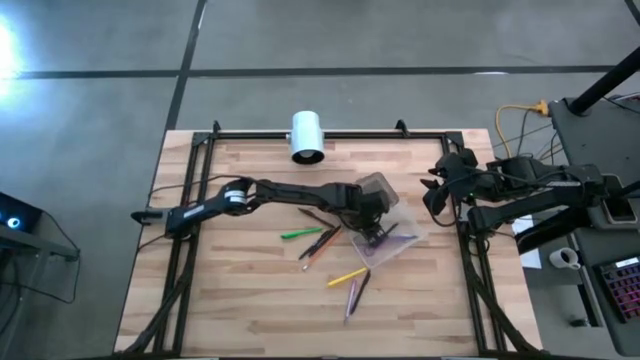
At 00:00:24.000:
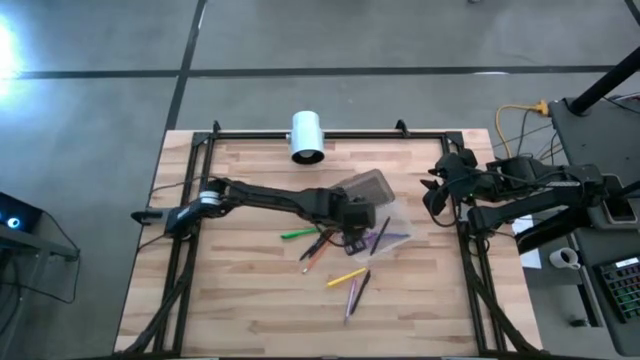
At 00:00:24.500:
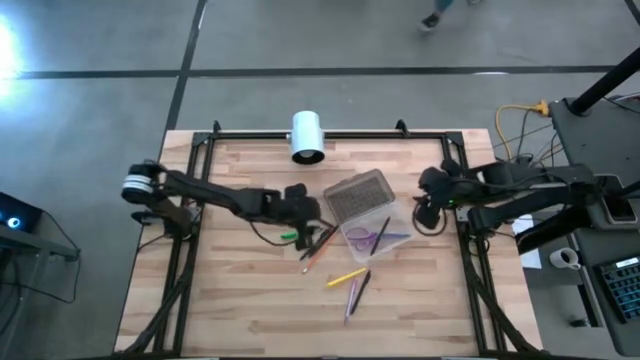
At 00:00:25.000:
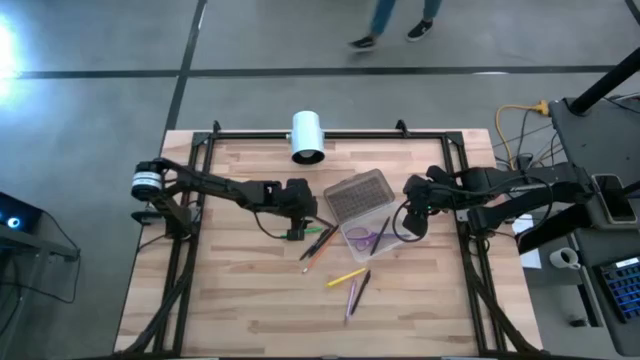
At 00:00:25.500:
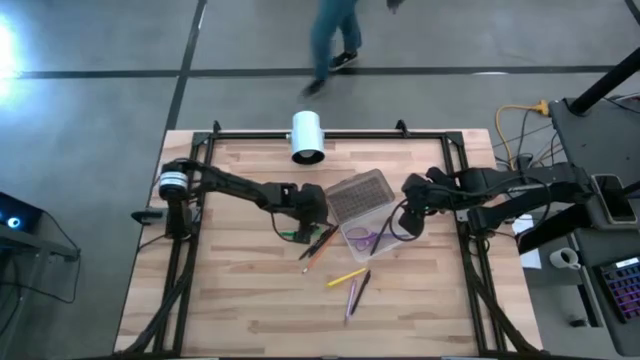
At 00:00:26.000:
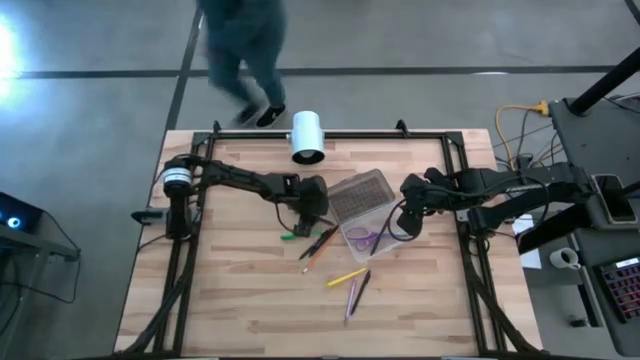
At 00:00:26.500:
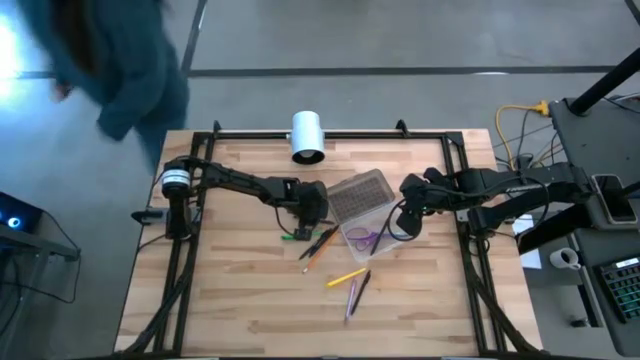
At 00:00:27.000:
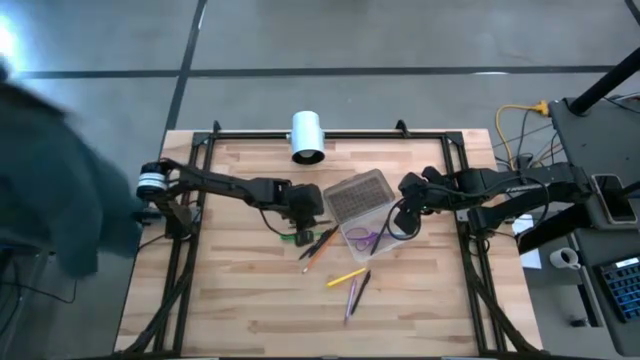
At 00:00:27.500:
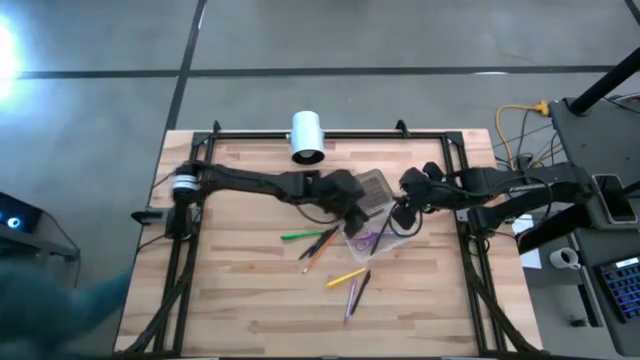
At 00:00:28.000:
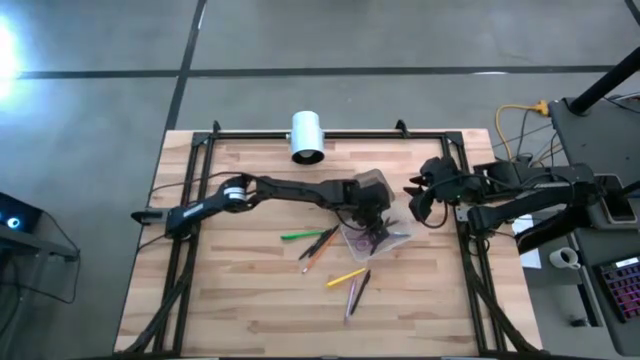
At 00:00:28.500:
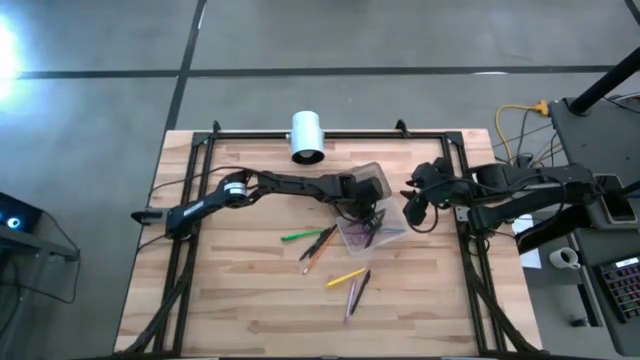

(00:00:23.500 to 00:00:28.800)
Task: Pick & place school supplies into a supply box
Put the brown pen into the supply box

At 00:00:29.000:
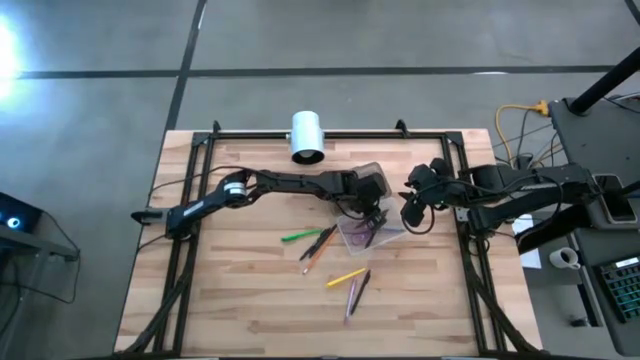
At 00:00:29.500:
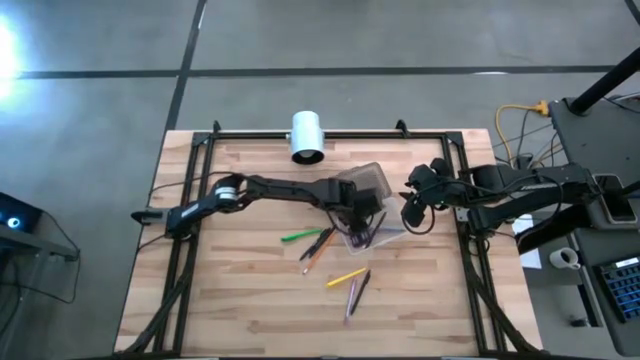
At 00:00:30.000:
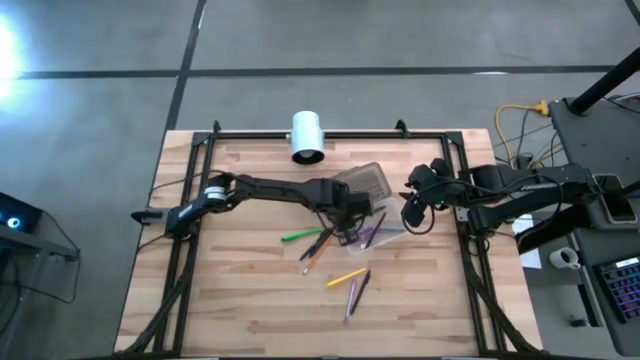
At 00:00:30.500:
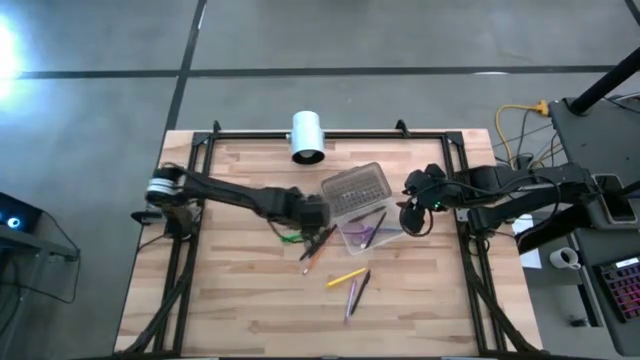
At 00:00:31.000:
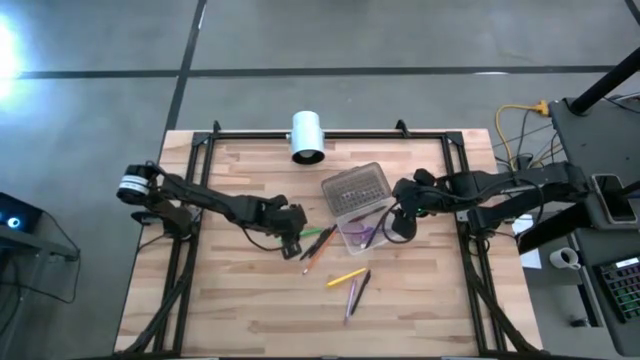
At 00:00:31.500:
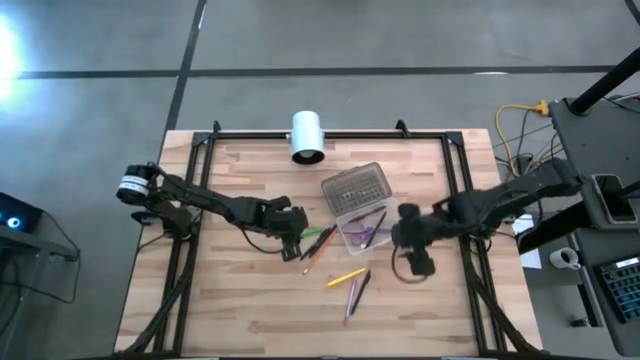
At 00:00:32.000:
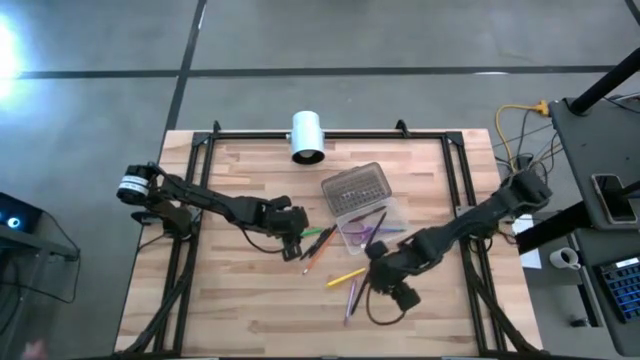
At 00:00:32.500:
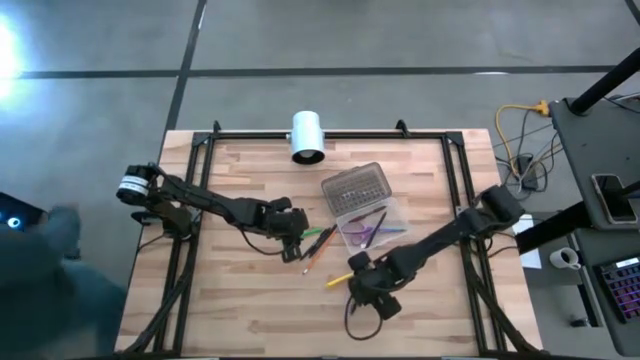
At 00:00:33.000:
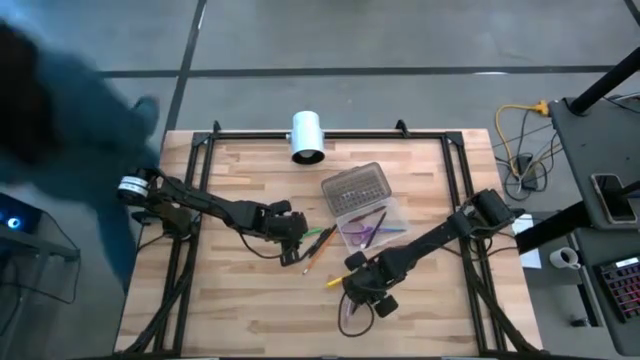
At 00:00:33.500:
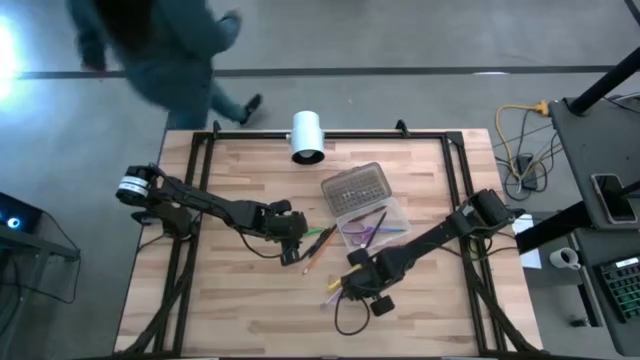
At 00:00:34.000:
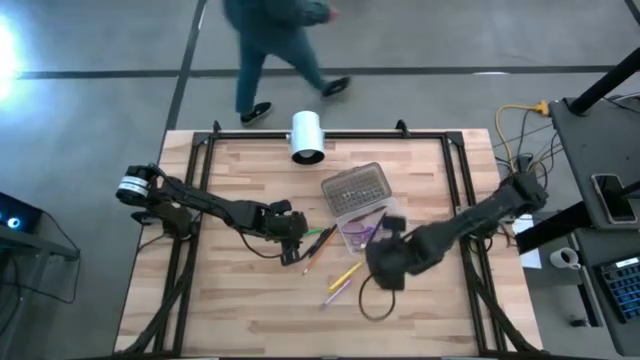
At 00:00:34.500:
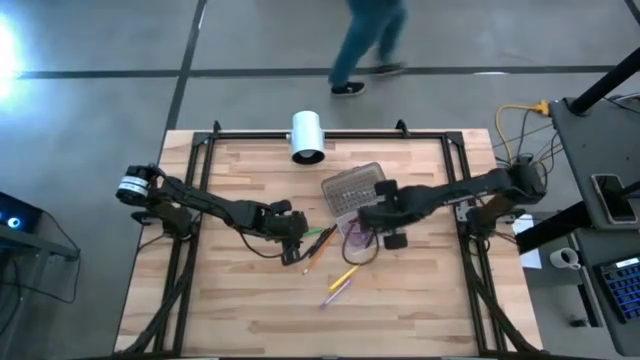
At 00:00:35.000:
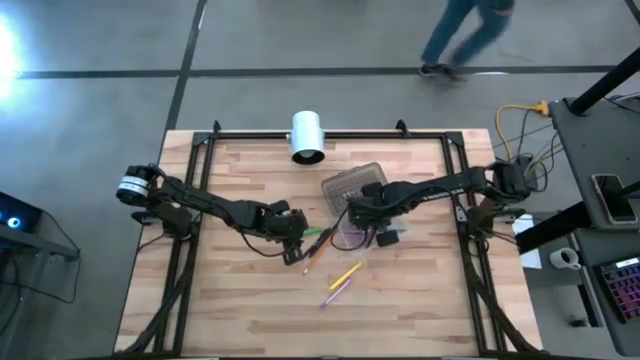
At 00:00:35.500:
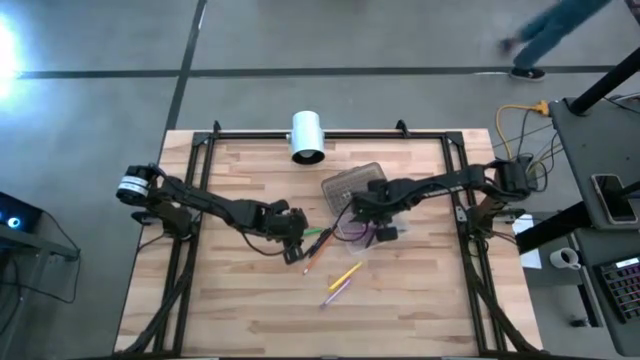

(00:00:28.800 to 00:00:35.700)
Put the black pen into the supply box

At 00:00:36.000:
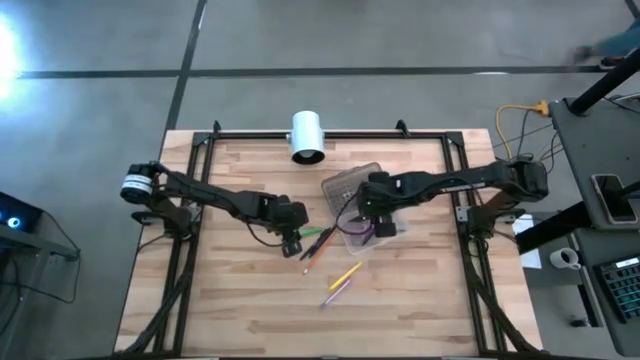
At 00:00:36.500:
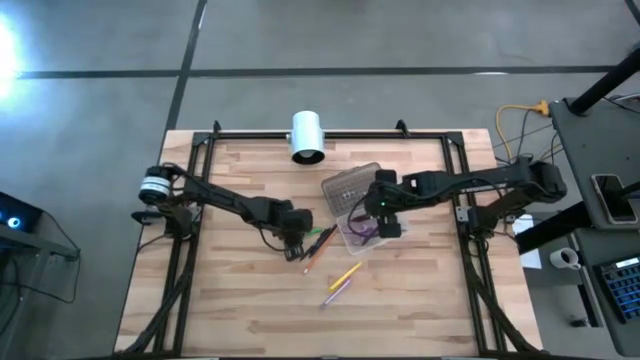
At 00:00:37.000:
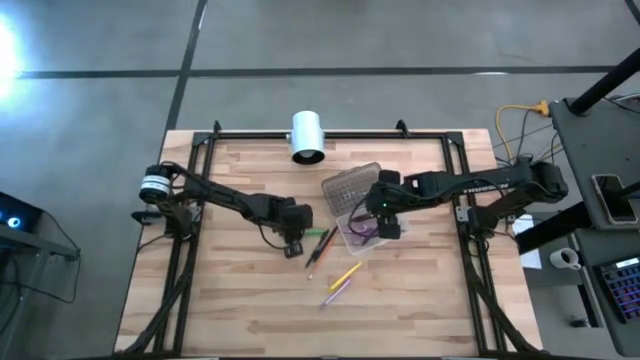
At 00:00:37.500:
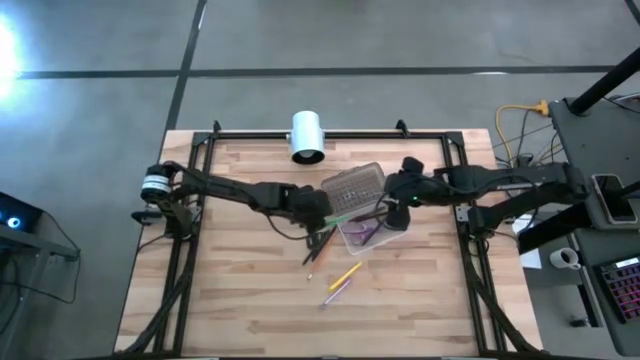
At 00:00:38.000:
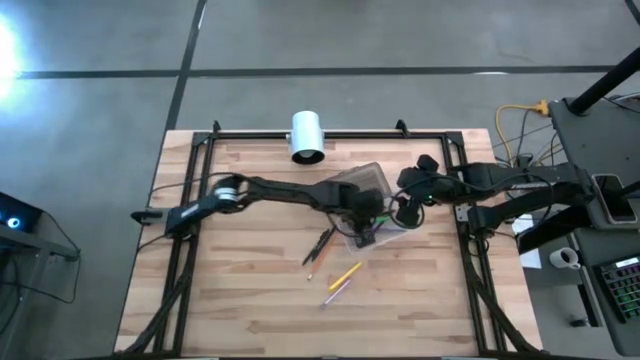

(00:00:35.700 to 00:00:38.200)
Put the green pen into the supply box

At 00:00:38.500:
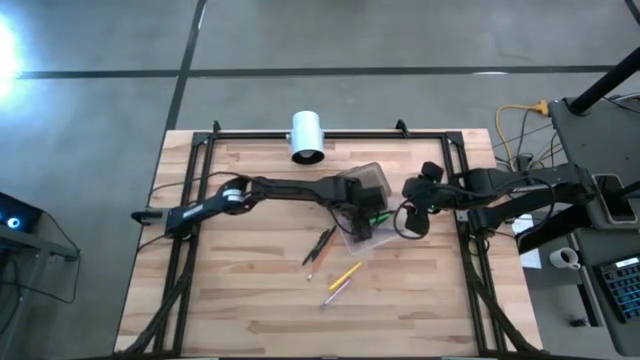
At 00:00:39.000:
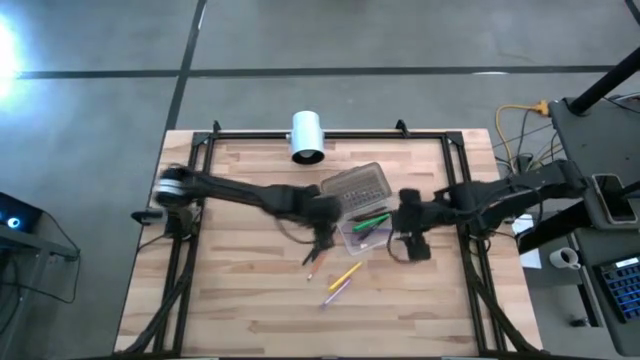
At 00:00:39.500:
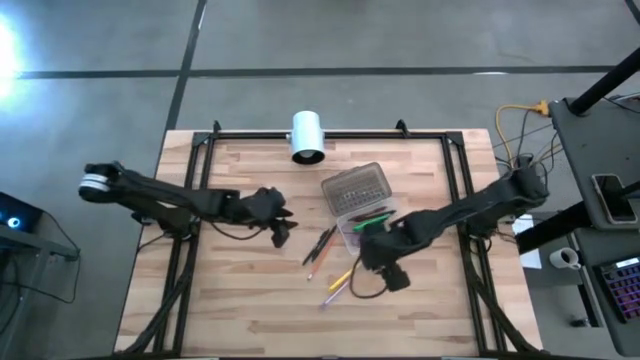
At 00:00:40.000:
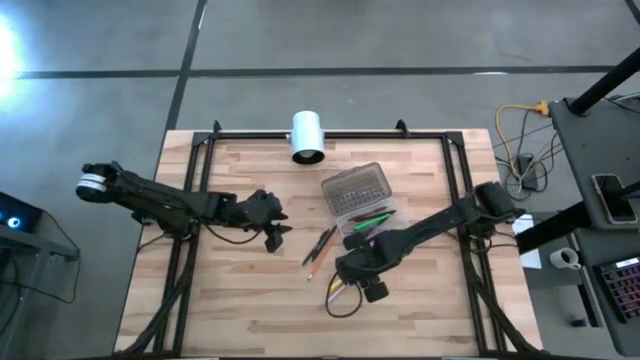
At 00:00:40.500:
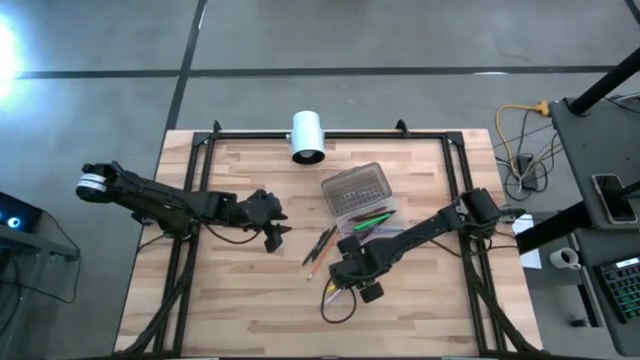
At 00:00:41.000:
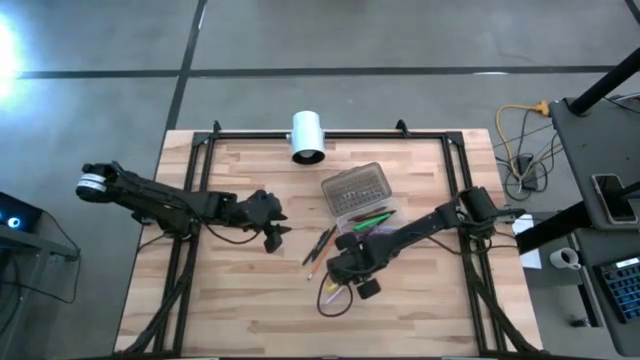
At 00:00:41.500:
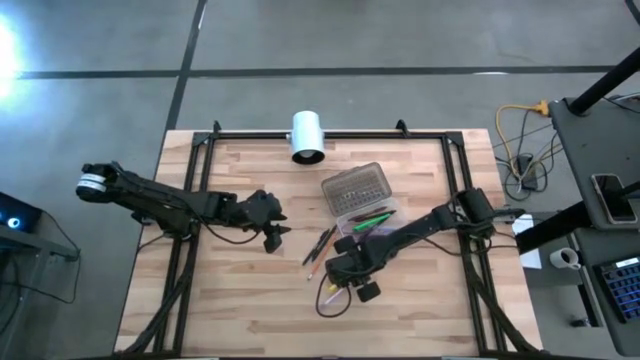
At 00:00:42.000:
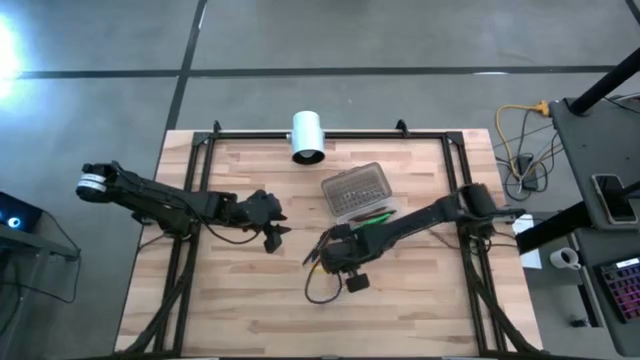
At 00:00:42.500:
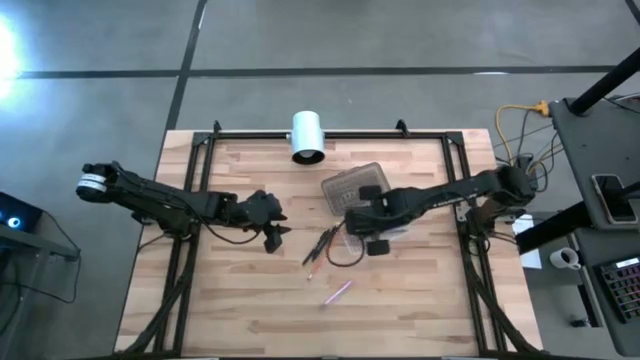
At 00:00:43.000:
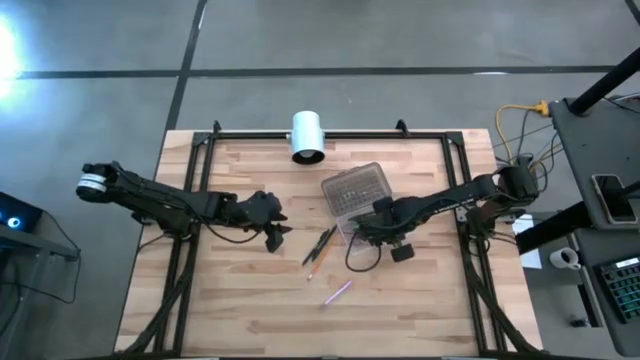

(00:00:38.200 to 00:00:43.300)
Put the yellow pen into the supply box

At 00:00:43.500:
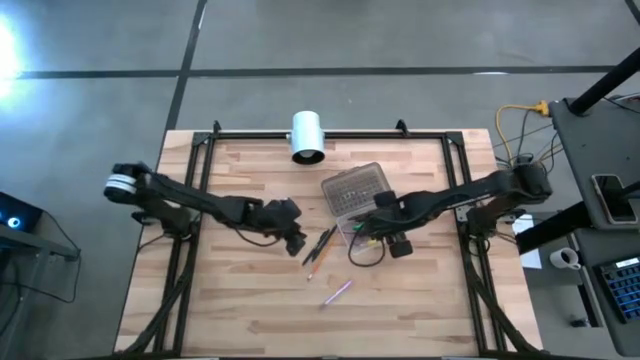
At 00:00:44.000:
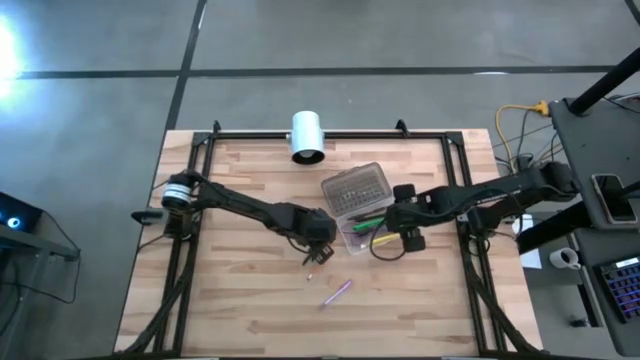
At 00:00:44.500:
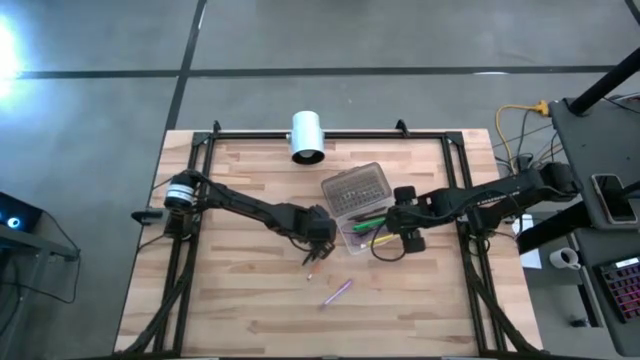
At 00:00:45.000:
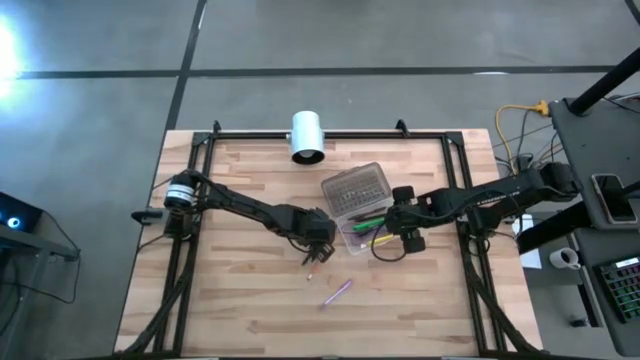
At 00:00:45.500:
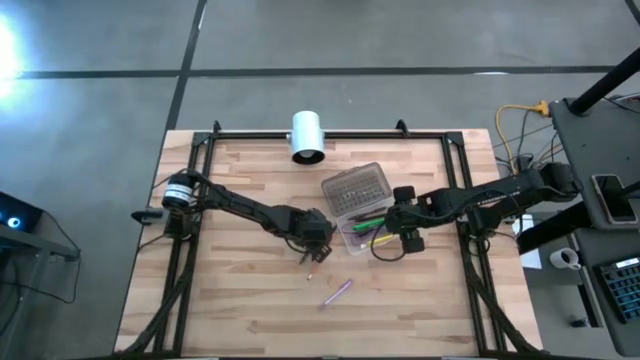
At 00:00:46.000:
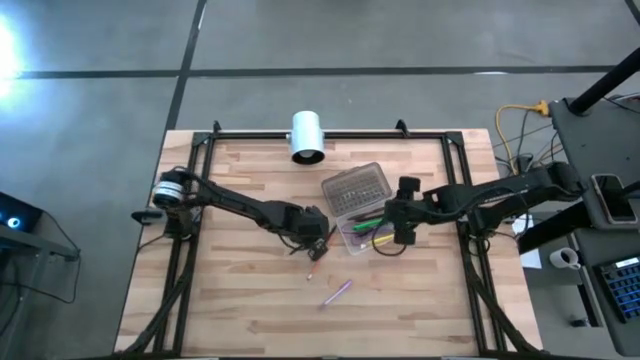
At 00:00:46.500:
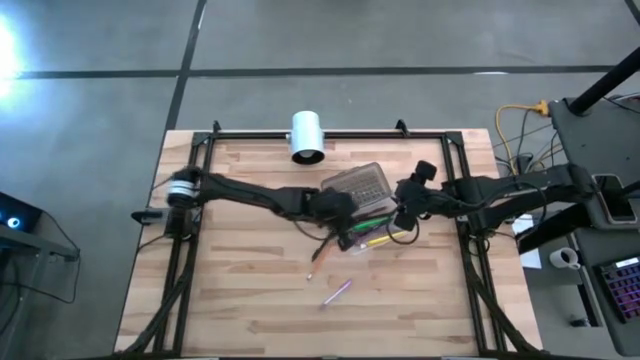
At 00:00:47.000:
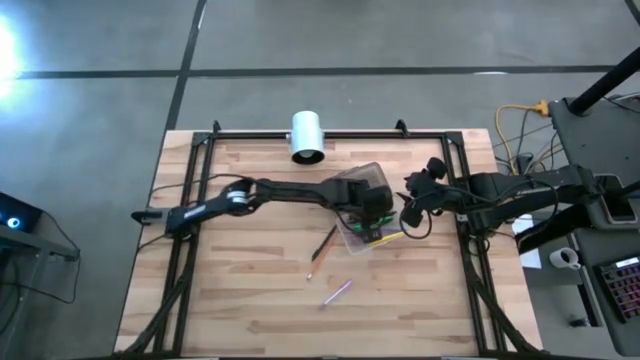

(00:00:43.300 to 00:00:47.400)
Put the black pen into the supply box
